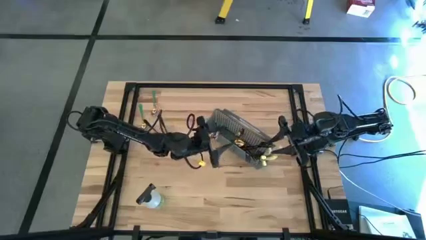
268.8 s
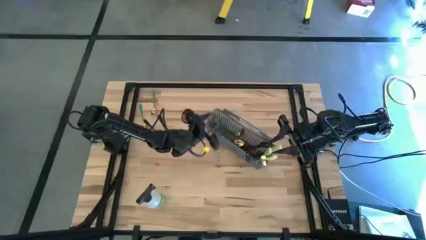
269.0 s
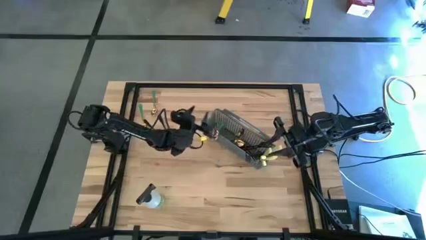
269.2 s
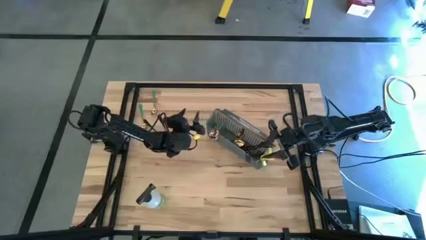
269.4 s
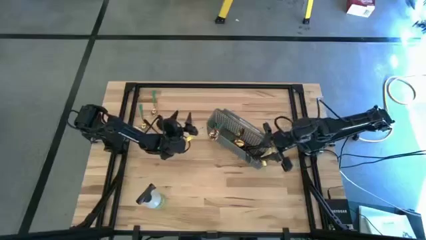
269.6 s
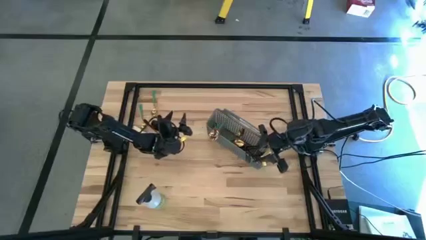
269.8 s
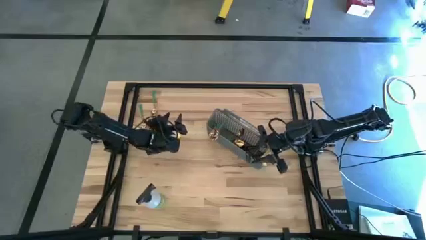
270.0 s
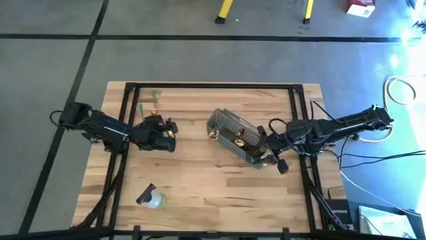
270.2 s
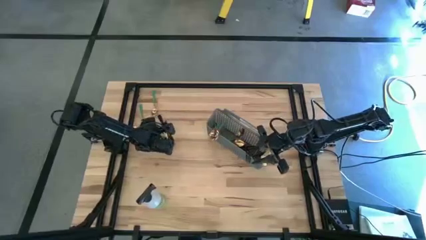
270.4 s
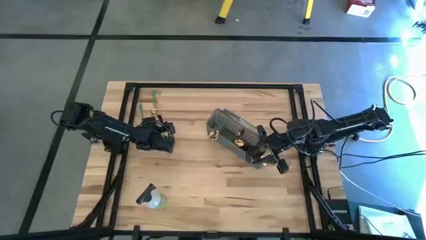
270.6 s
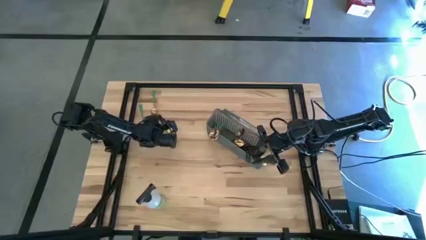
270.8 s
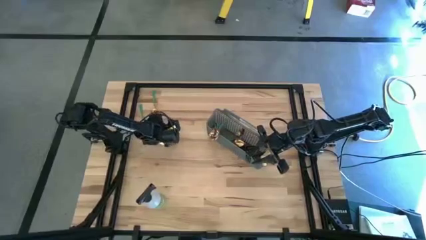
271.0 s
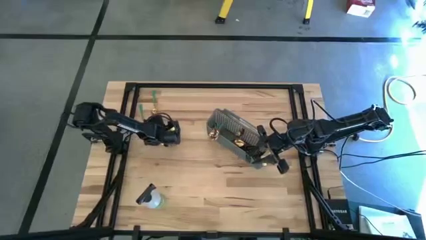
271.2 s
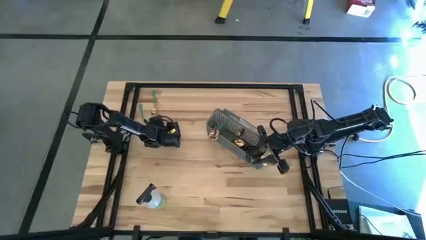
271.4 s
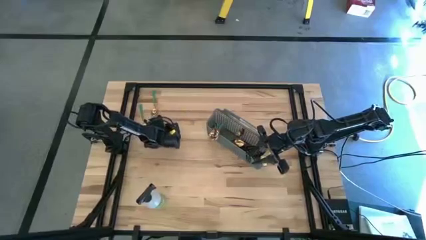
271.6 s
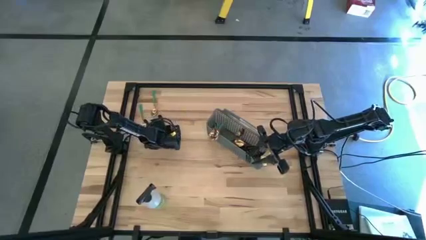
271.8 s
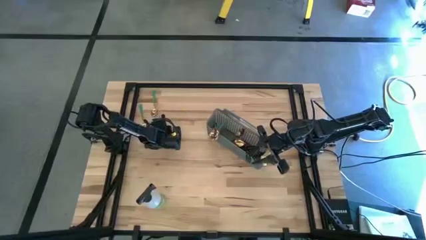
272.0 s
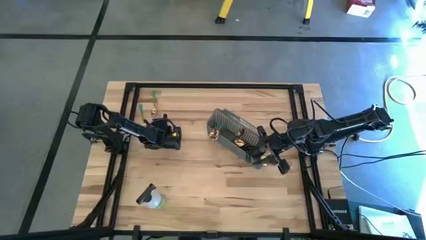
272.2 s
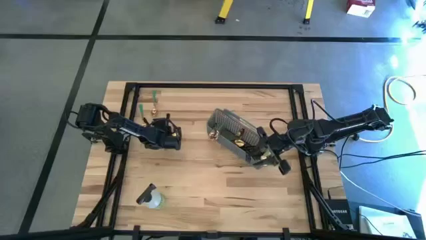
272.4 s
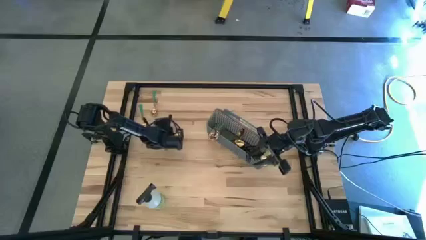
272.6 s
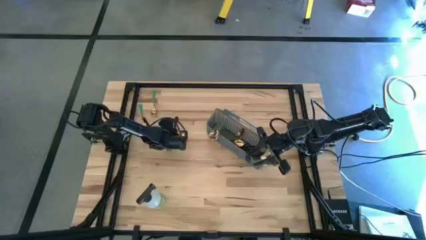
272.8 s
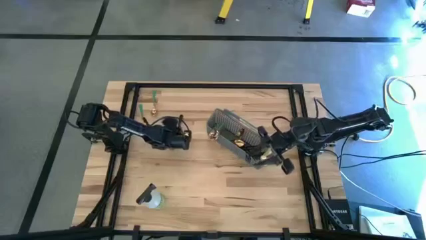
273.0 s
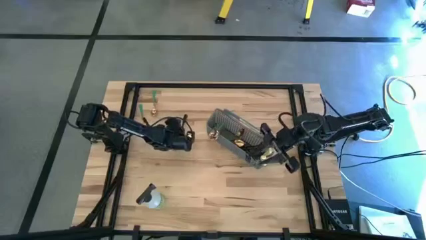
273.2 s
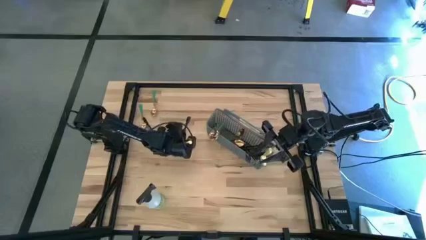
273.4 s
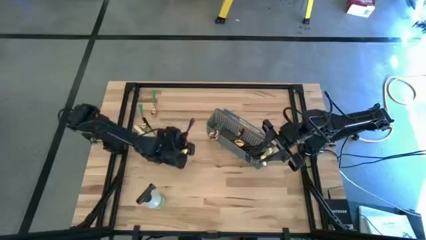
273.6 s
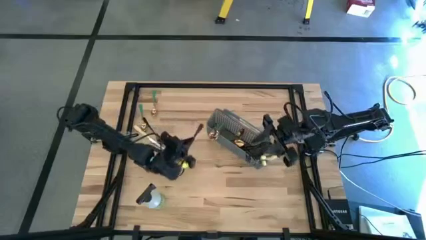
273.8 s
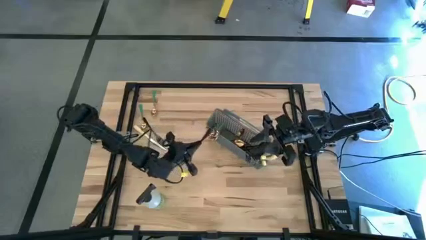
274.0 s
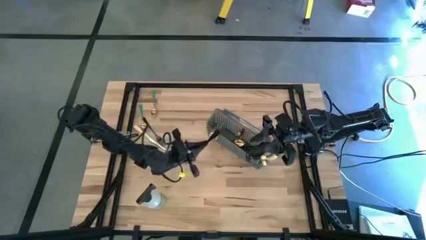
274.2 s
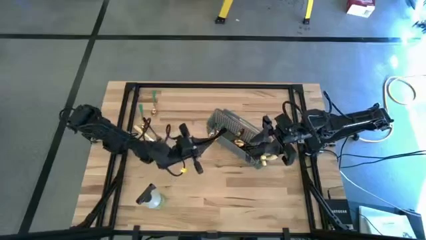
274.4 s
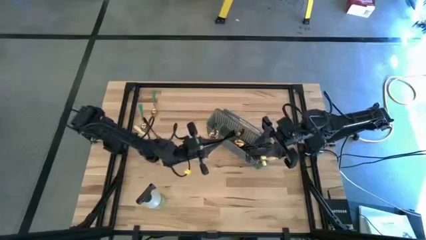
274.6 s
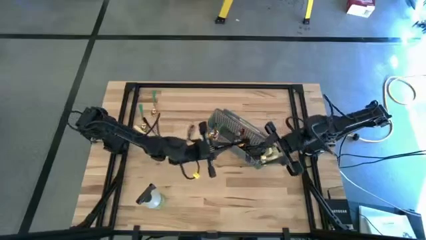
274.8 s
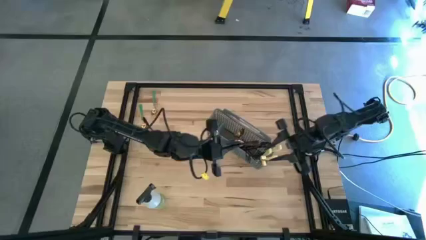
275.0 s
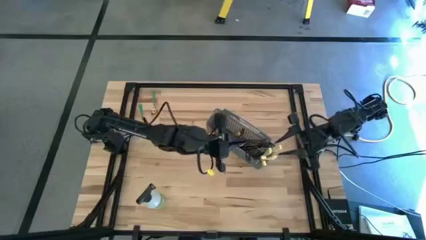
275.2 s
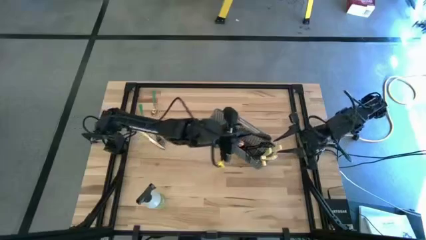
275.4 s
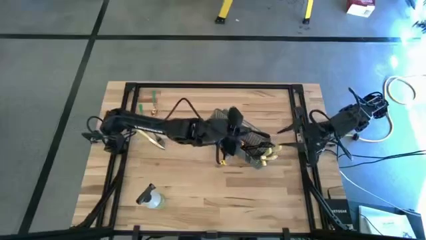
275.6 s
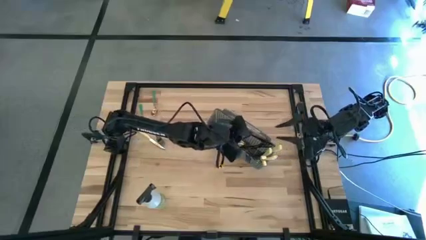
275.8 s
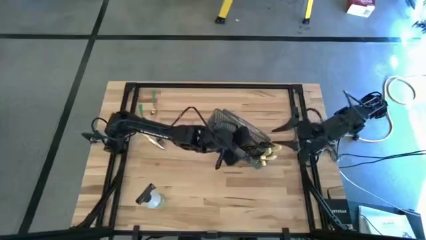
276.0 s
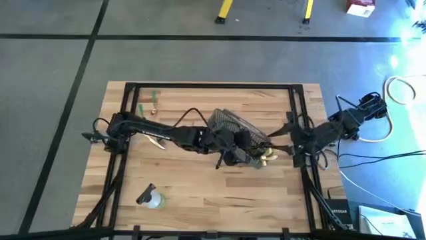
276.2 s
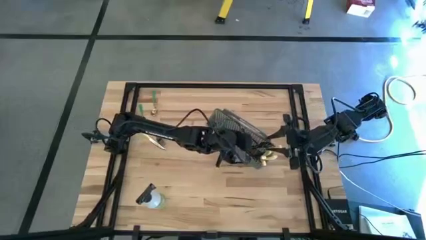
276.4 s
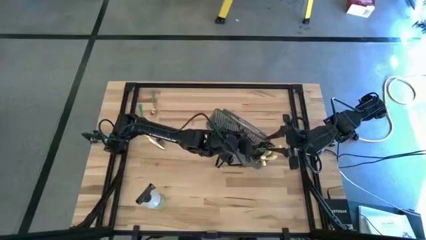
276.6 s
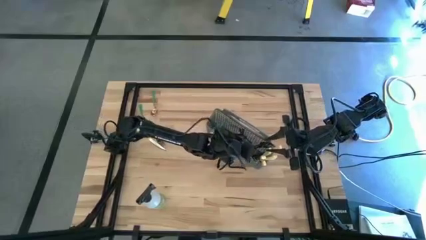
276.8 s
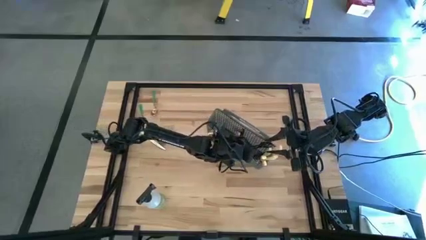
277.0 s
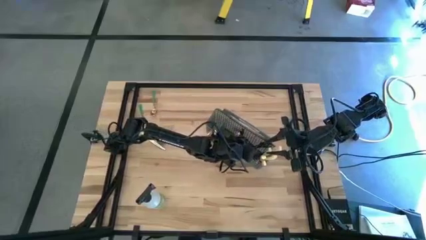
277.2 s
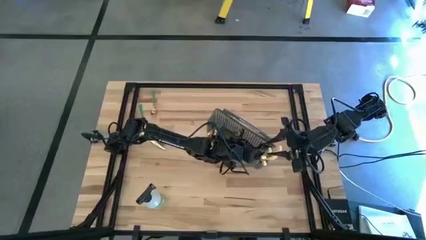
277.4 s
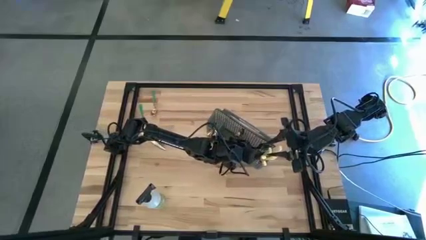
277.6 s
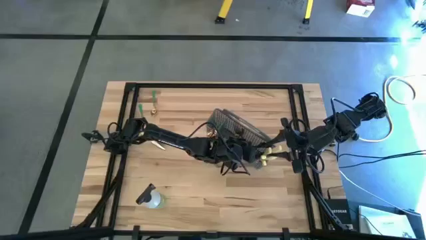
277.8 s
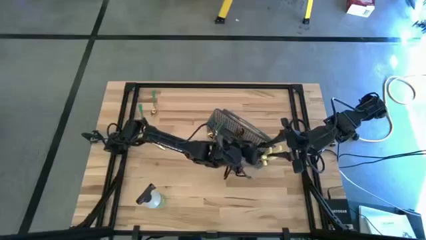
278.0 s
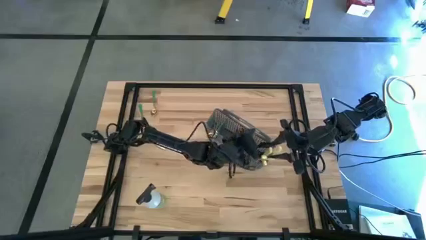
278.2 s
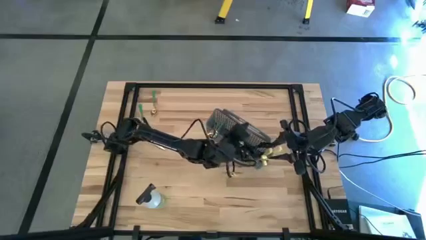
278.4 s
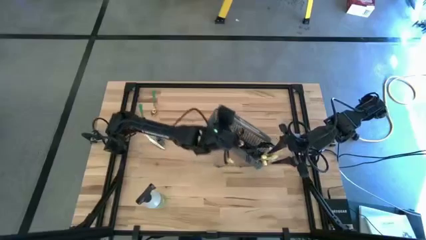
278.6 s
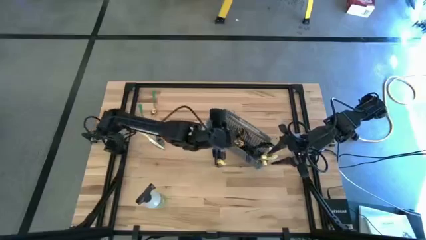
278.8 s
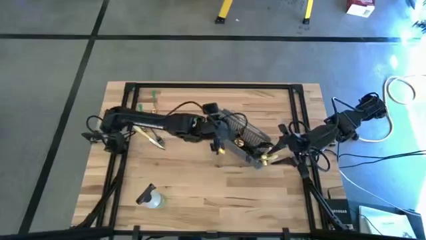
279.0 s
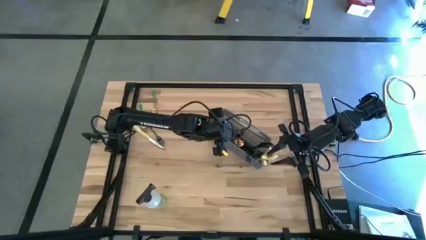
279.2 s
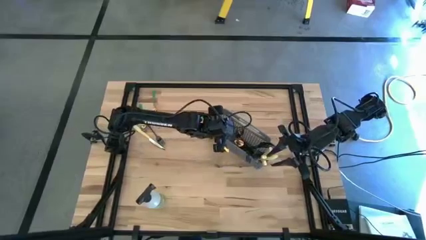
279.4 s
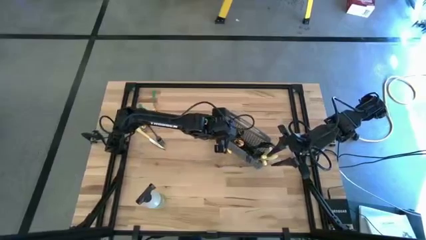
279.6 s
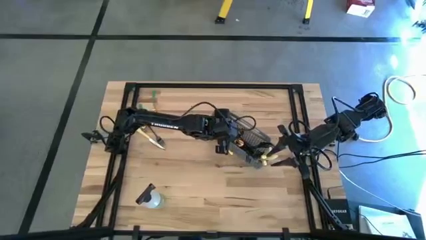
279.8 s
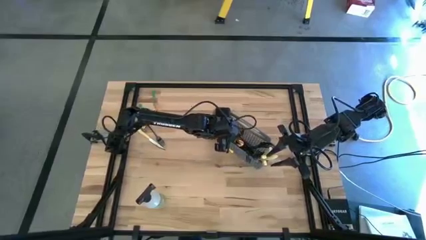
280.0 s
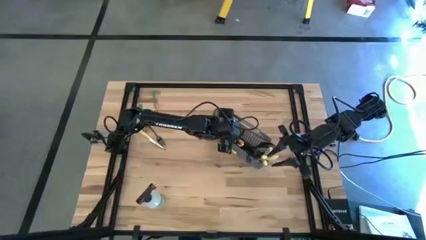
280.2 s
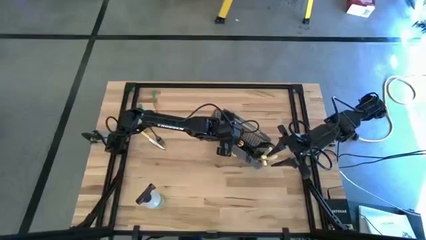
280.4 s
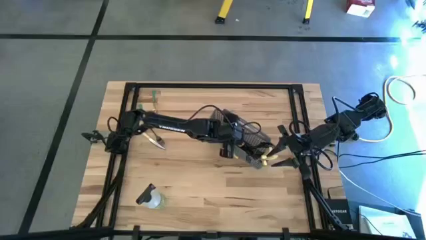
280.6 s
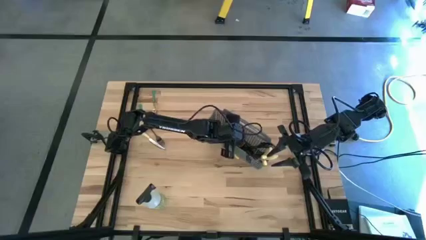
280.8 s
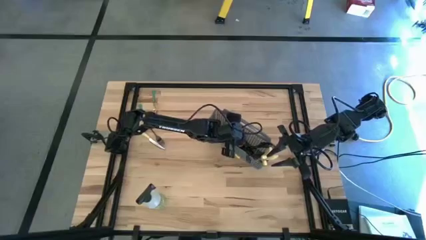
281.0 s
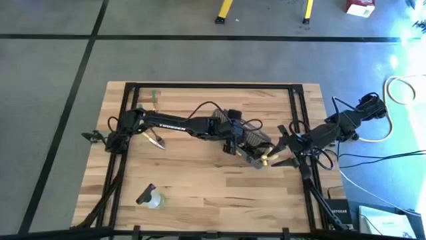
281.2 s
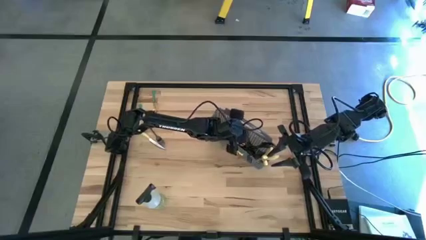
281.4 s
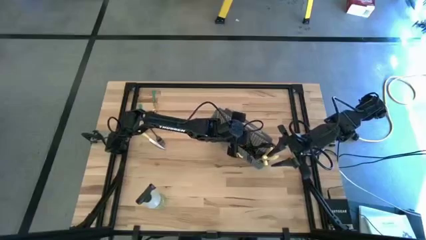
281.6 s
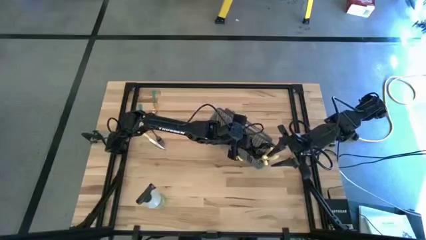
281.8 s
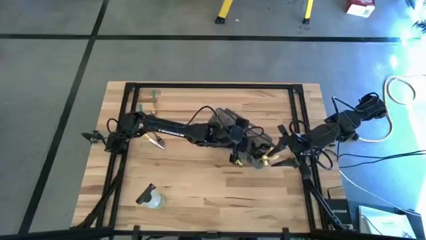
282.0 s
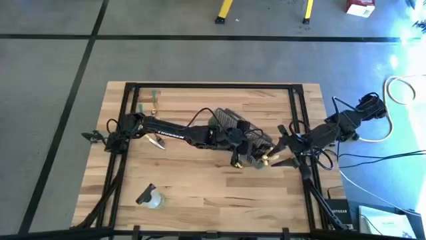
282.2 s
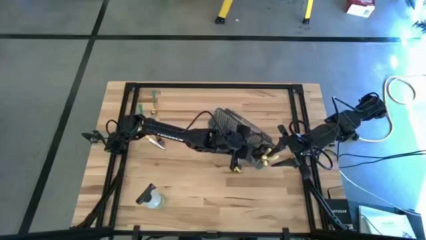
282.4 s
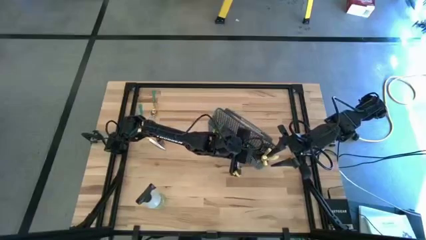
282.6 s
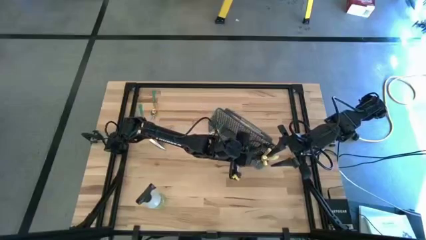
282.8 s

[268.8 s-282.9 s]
Task: Sort silverware
Put the black fork into the cutlery rack

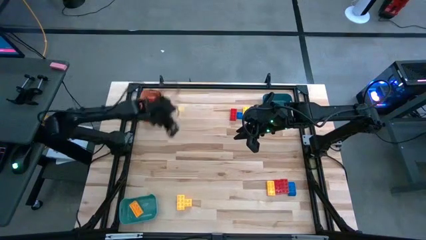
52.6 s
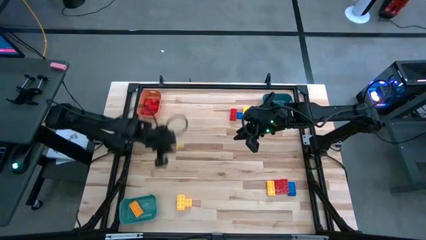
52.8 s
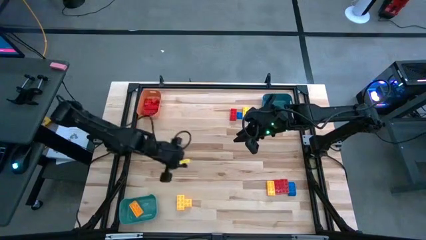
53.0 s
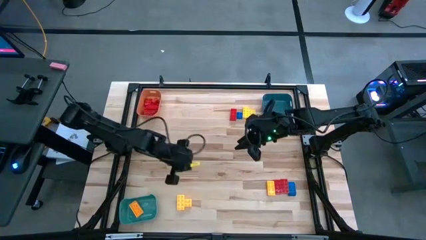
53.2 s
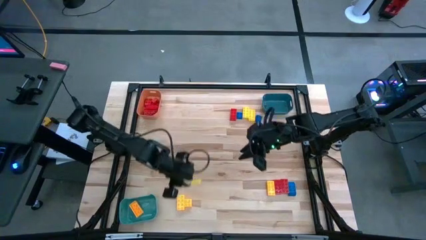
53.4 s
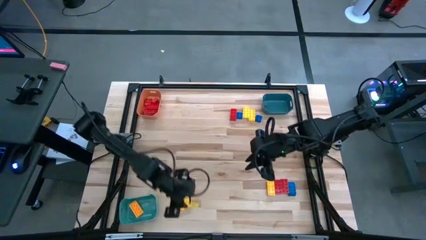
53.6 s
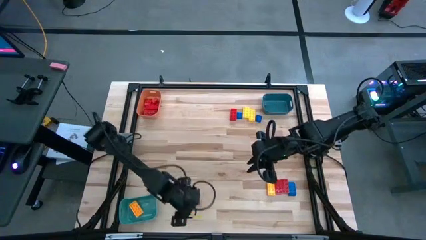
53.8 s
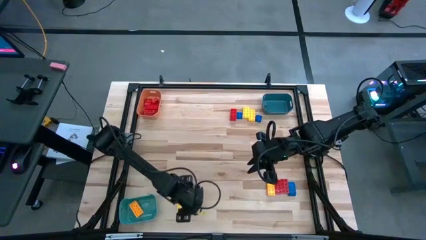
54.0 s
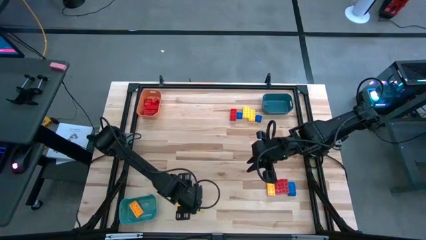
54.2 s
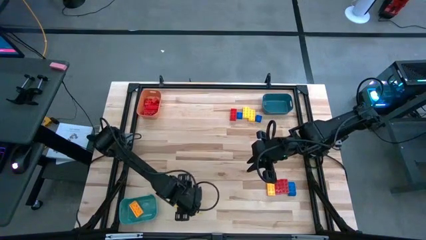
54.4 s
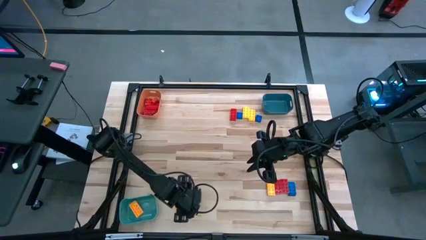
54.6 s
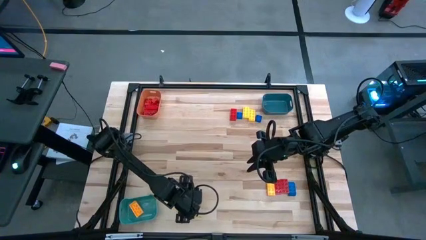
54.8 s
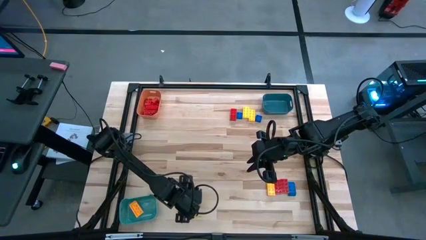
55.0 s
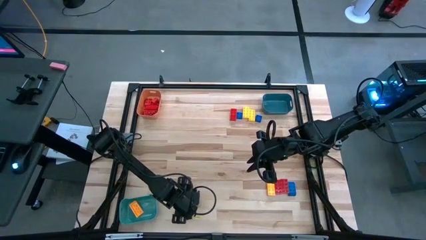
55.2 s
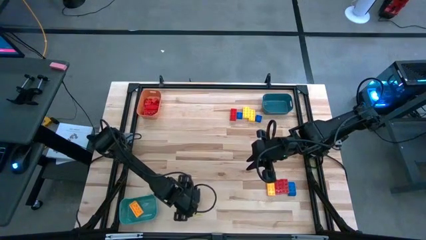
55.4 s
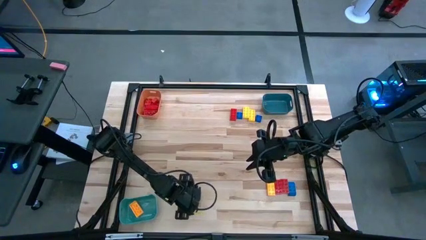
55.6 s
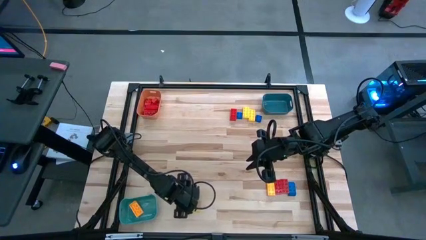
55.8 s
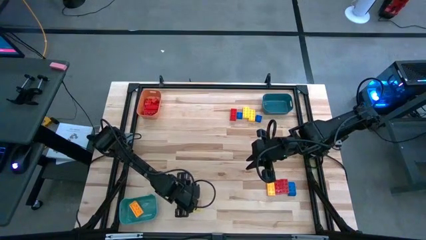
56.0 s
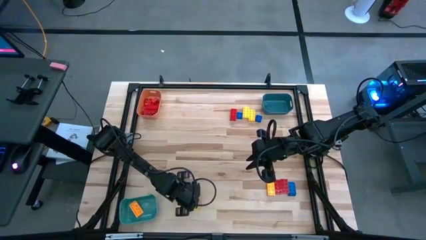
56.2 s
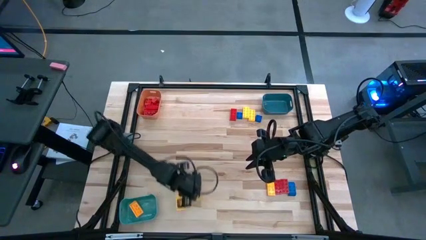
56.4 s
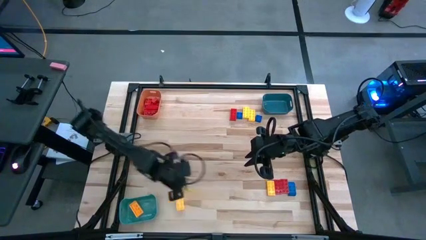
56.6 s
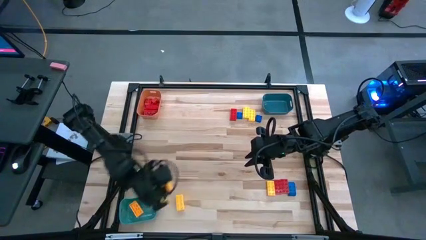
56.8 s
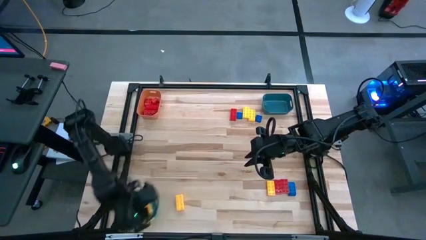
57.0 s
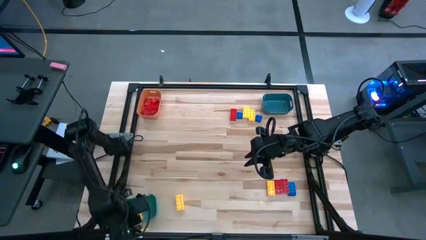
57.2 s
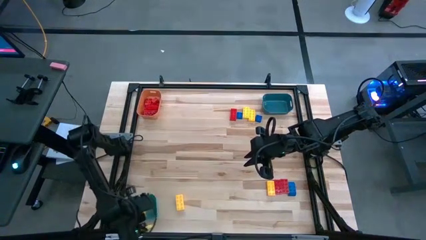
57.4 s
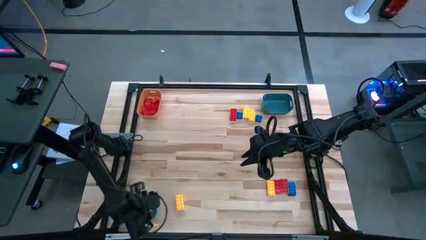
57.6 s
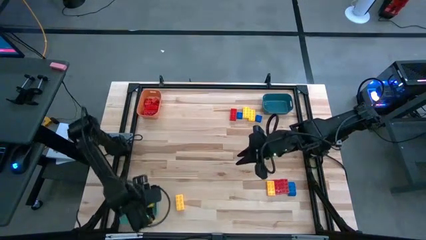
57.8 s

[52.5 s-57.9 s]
Task: Sort blocks
Put the yellow game piece into the green bin
